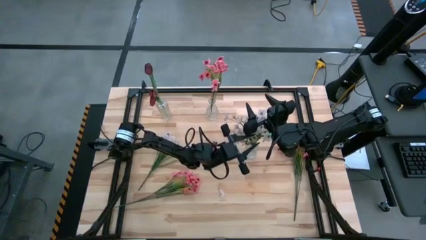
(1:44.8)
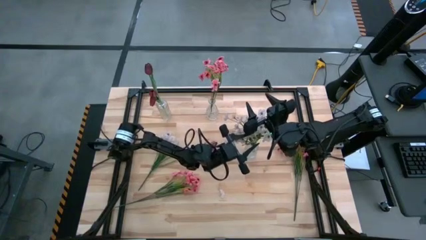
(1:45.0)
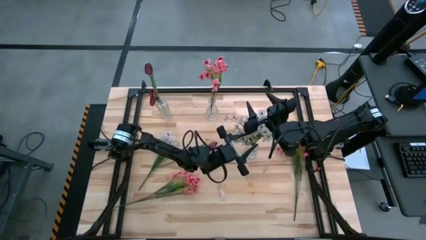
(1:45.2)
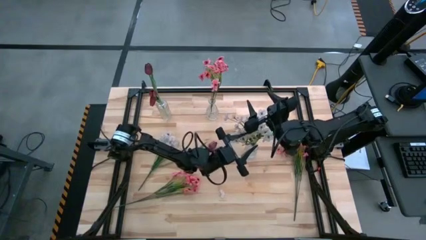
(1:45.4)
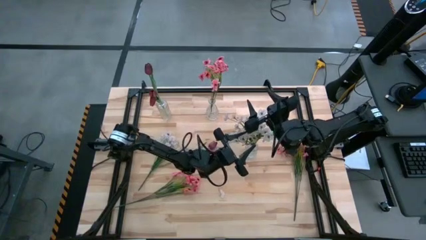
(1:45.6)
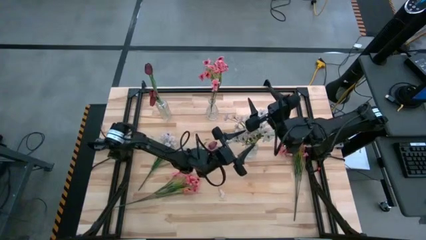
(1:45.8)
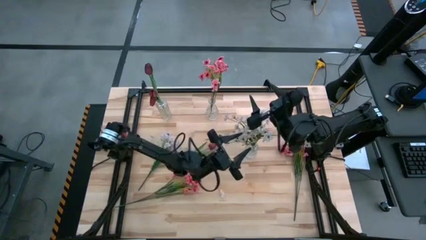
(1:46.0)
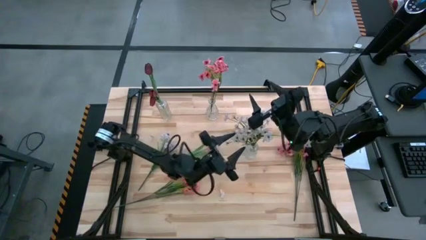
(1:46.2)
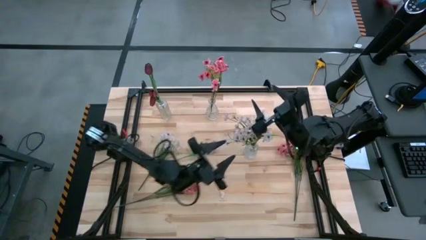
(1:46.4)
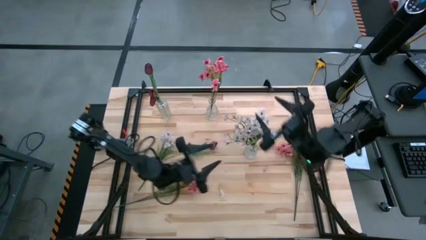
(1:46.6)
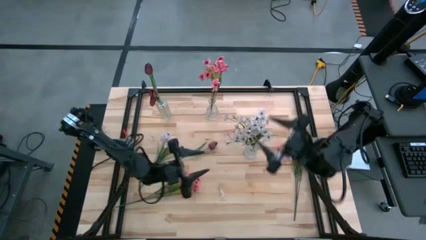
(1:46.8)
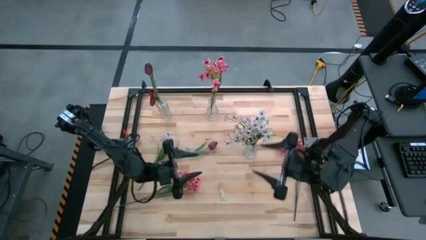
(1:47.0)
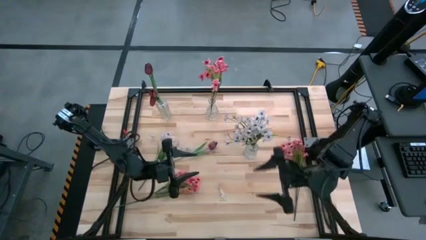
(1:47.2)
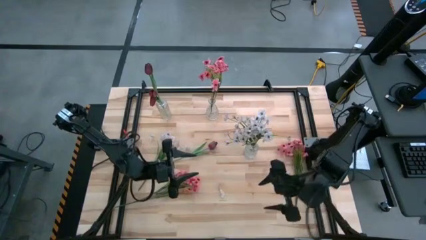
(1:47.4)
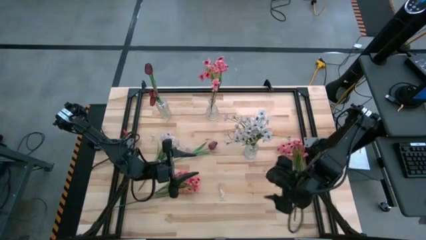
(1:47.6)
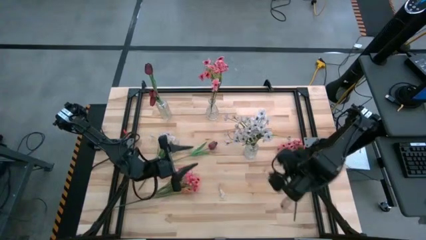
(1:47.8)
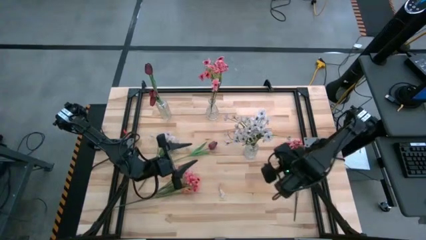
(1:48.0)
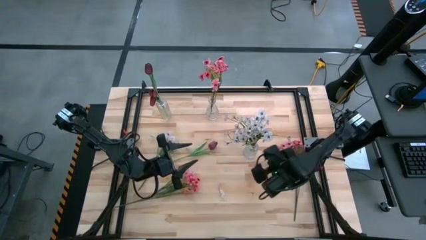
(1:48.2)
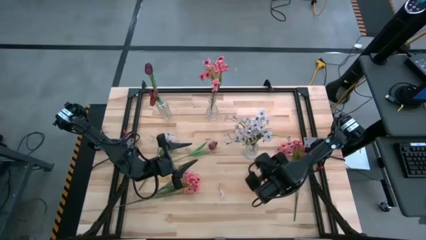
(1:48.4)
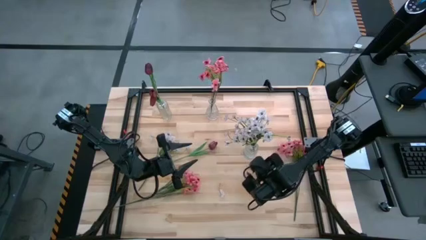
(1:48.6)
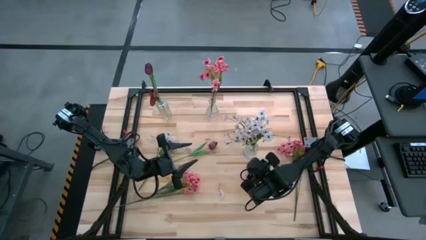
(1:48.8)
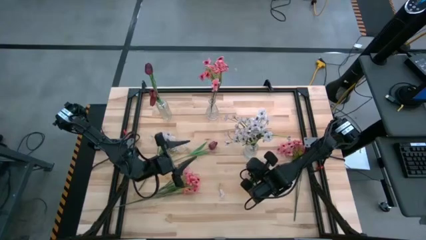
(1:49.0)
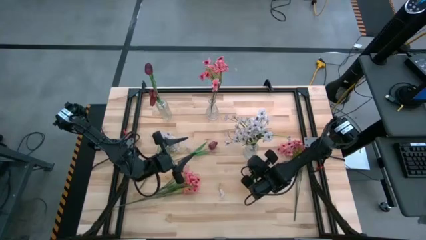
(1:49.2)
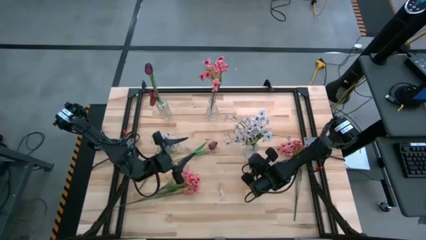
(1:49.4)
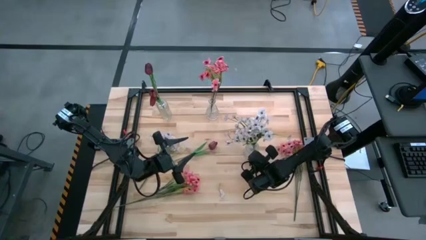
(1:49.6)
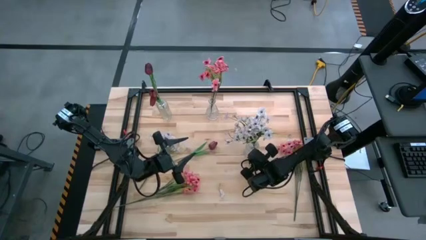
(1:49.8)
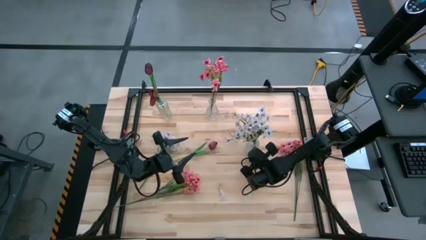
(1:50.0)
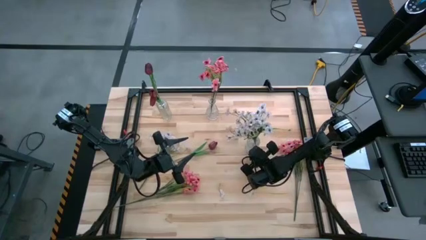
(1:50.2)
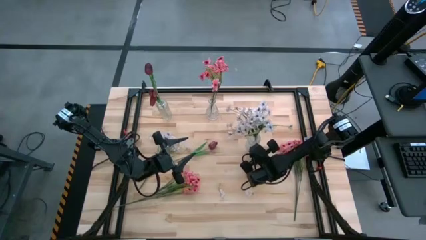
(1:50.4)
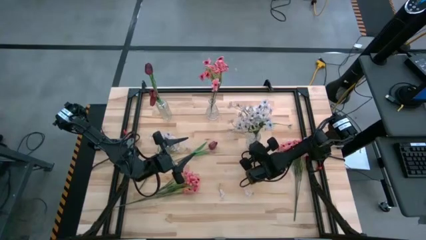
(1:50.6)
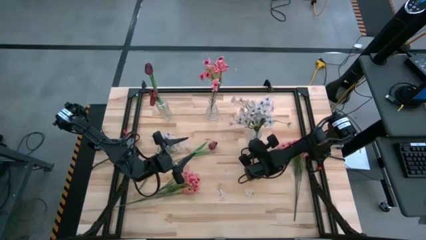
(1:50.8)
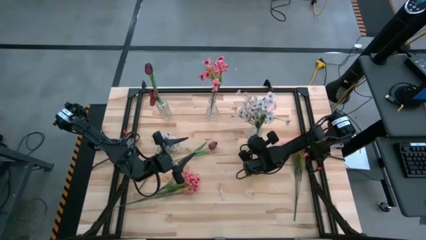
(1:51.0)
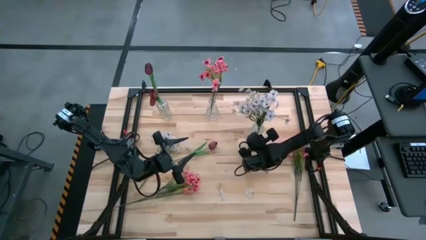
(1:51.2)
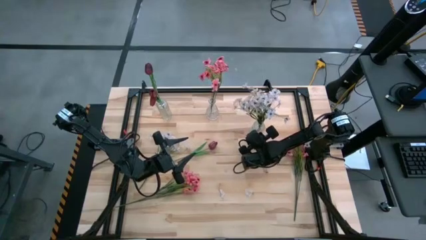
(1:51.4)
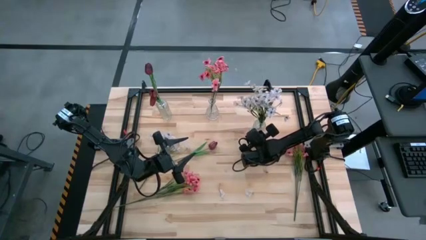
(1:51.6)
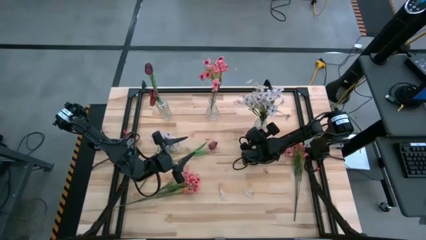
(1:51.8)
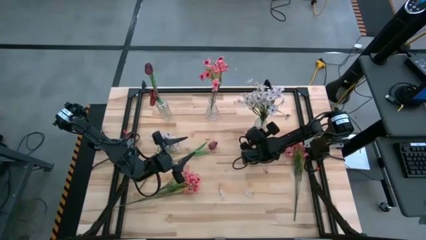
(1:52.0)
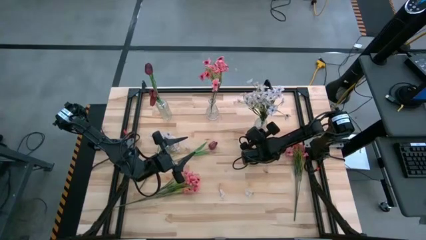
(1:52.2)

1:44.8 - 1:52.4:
Task: Sort flowers into vase by color
Adjust the right transparent vase

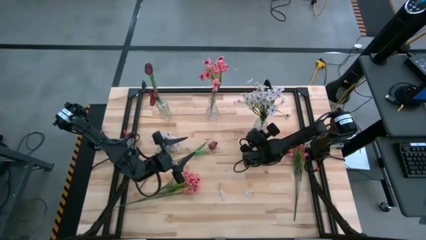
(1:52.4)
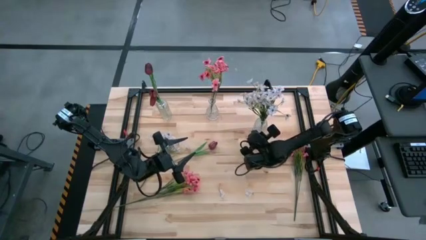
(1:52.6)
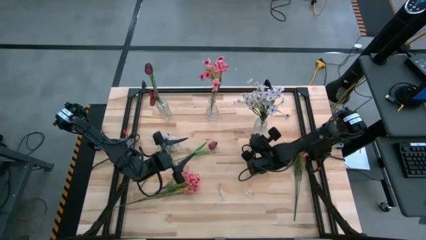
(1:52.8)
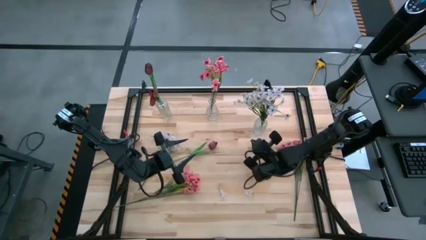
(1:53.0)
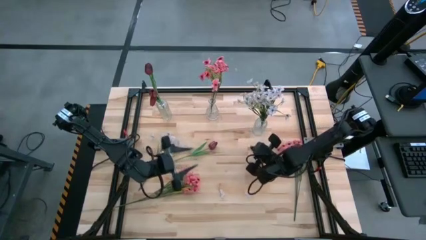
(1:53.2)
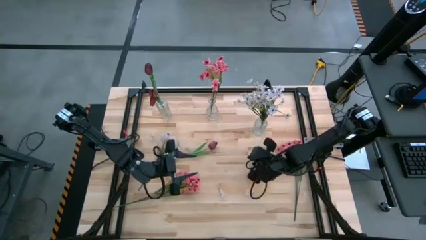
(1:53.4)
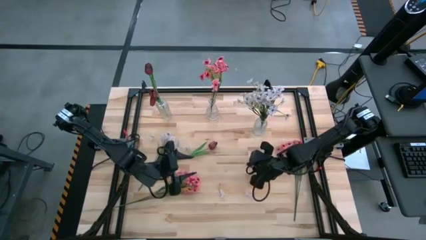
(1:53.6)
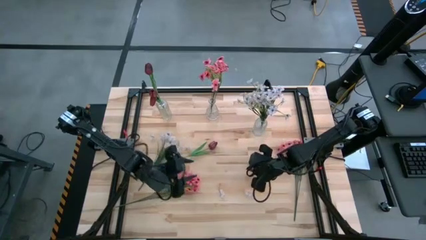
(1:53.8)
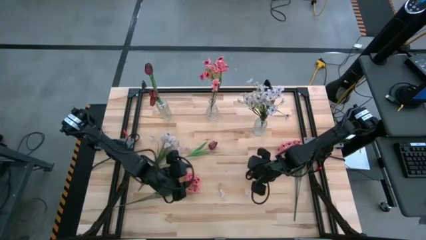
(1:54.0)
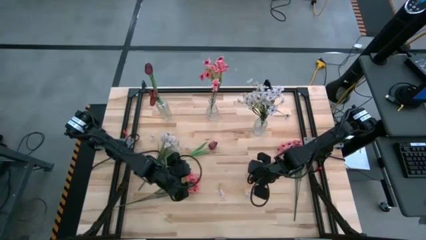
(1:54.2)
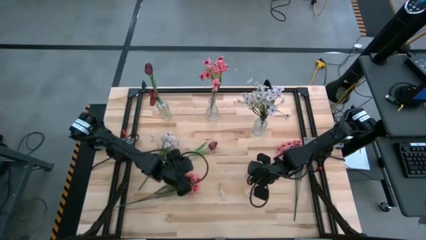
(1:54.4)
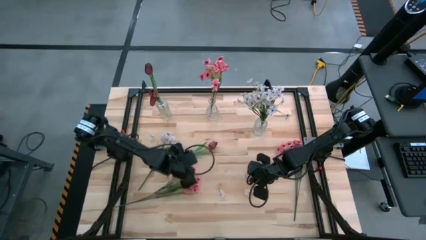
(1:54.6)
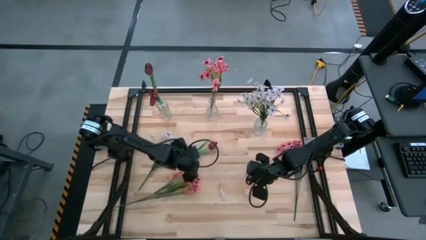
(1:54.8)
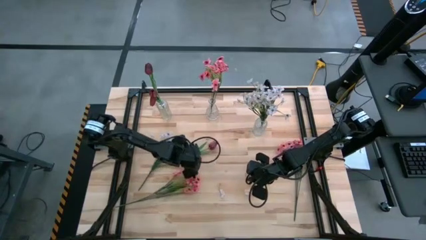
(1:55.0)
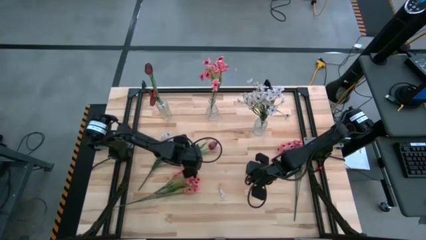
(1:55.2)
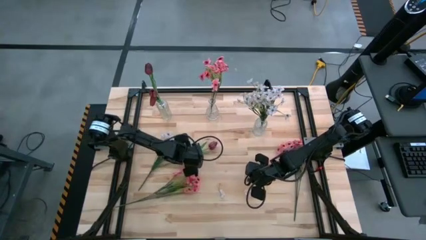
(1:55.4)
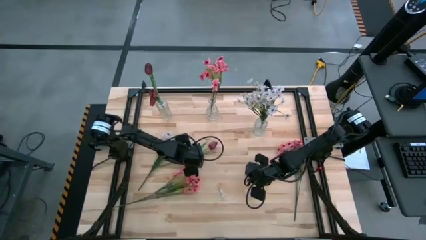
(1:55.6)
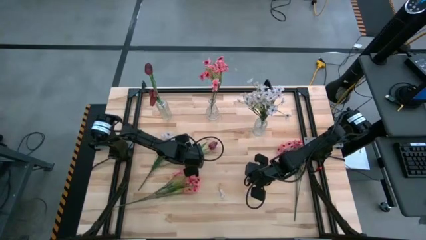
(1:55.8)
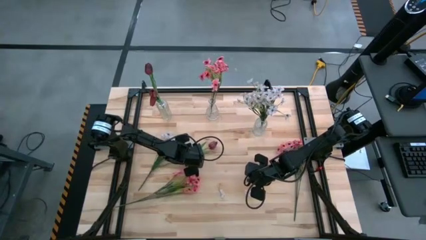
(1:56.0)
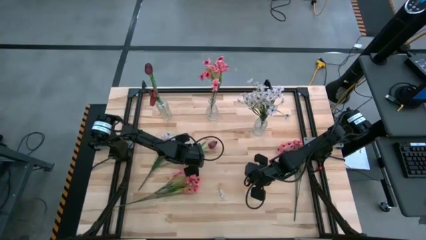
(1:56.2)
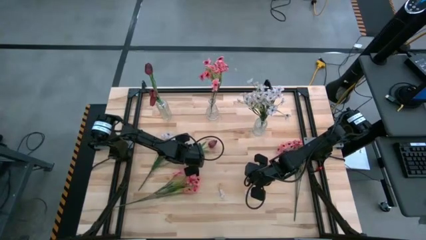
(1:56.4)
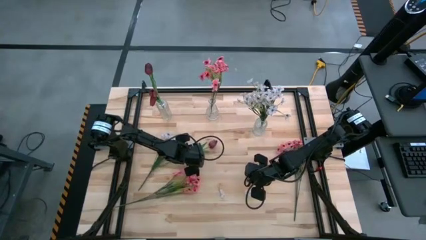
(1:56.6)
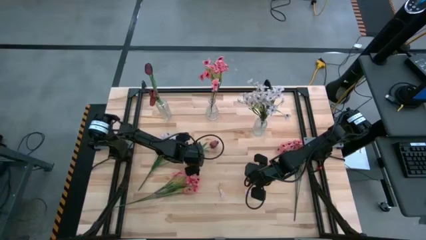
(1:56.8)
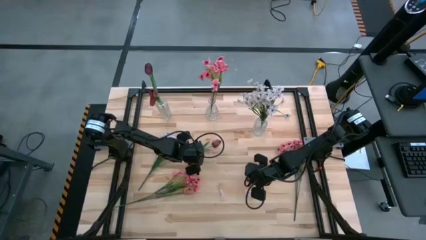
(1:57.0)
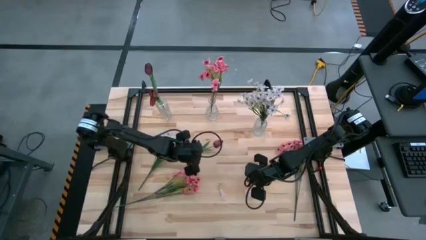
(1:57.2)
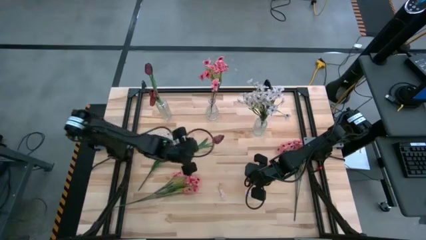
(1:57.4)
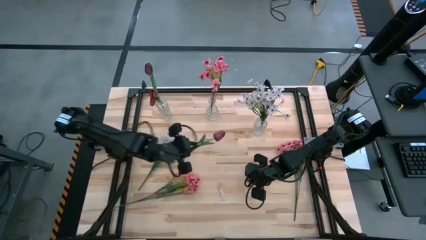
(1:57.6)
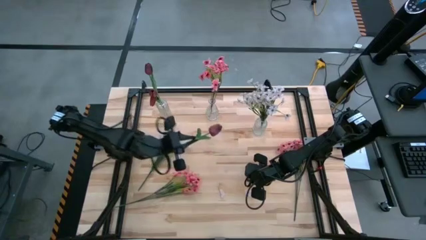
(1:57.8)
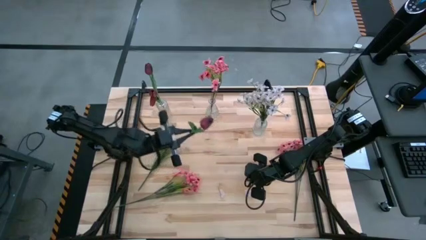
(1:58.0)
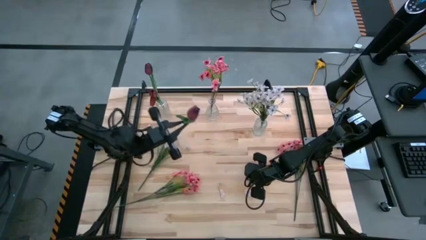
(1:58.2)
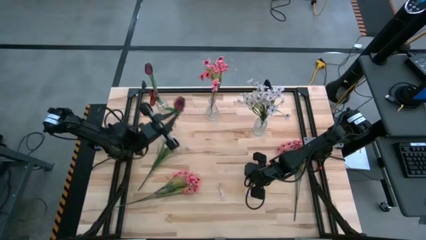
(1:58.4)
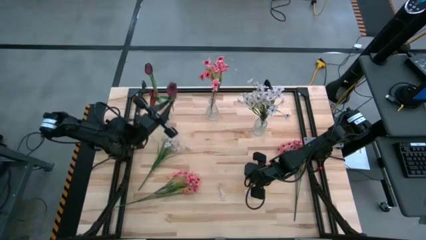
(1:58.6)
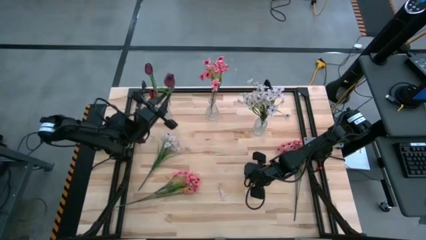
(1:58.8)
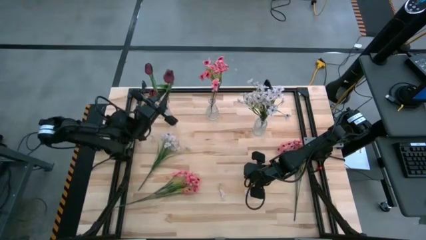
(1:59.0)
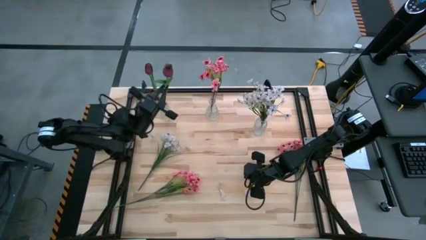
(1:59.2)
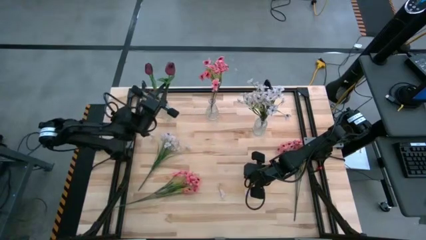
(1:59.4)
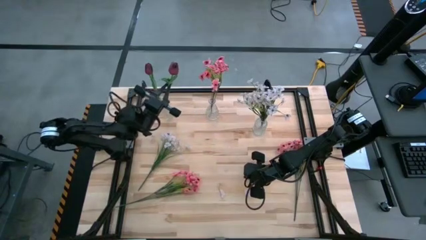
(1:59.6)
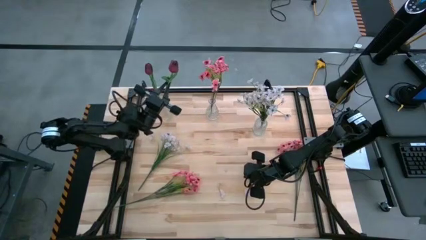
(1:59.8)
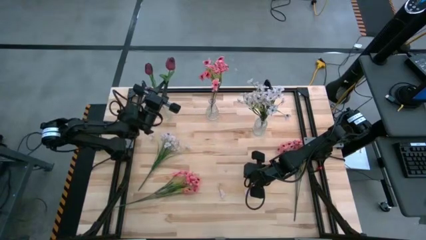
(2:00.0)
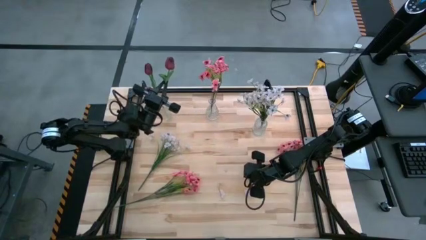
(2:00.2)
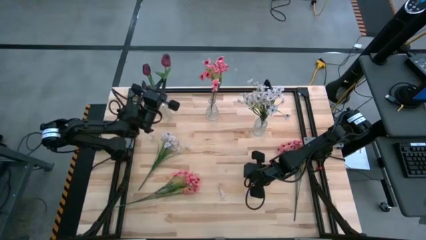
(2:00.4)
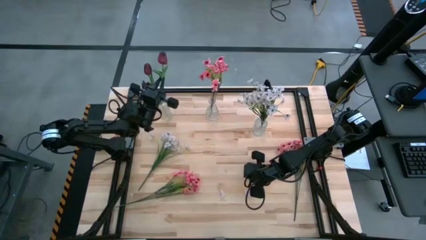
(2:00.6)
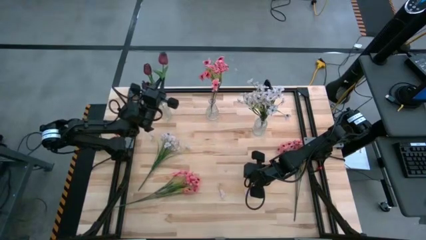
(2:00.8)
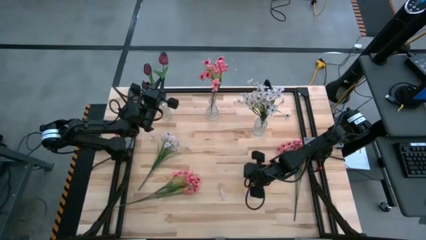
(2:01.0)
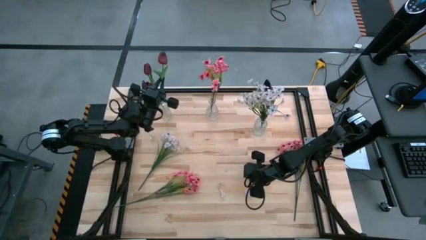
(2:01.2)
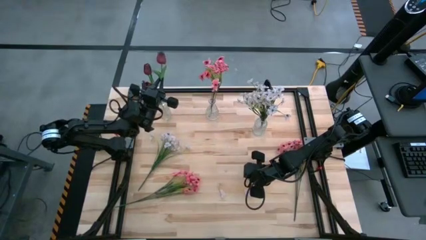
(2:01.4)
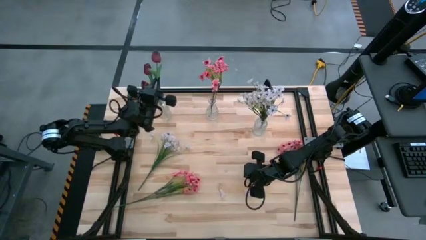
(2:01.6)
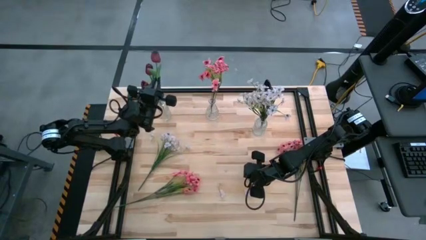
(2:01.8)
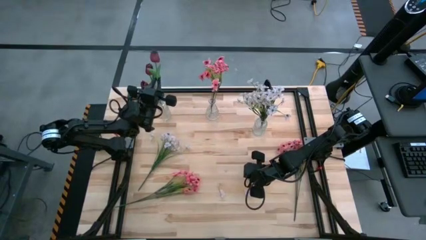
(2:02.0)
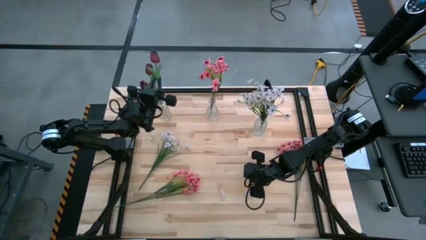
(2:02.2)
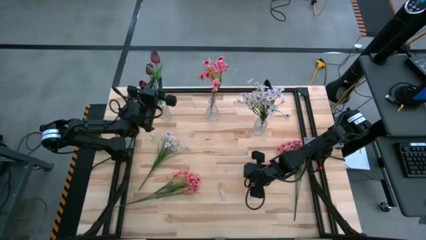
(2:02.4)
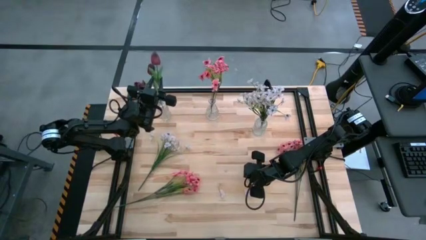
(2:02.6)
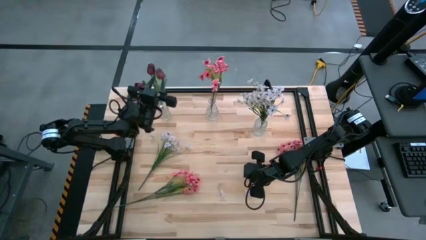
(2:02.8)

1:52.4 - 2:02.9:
Put the purple tulip into the left transparent vase
